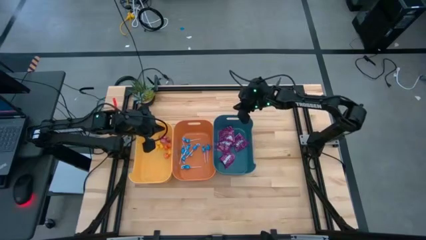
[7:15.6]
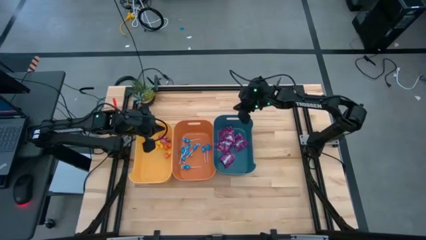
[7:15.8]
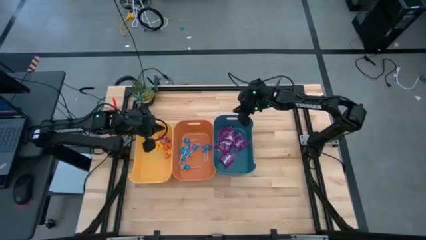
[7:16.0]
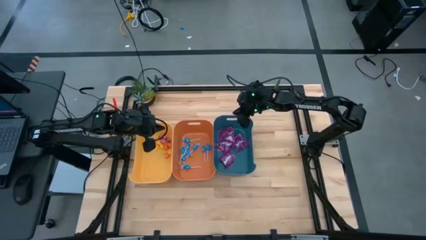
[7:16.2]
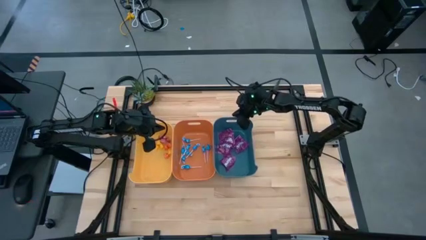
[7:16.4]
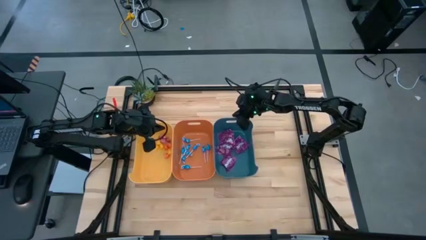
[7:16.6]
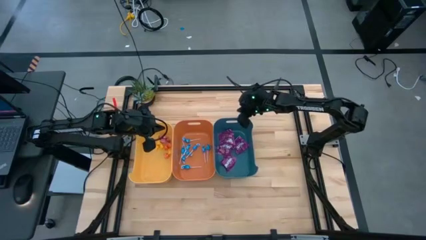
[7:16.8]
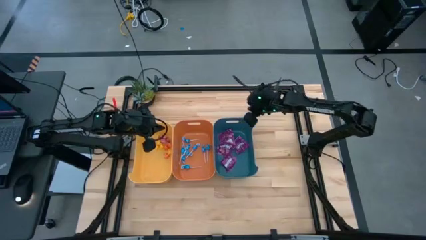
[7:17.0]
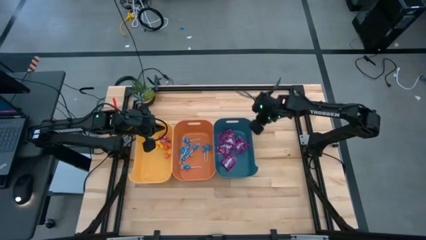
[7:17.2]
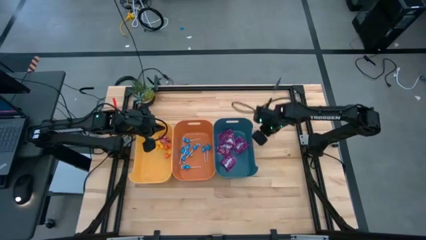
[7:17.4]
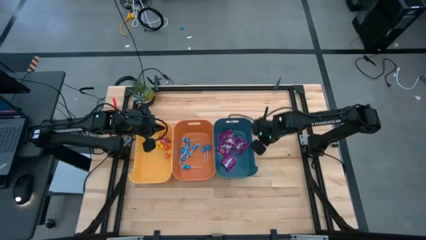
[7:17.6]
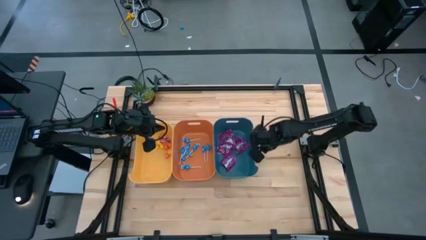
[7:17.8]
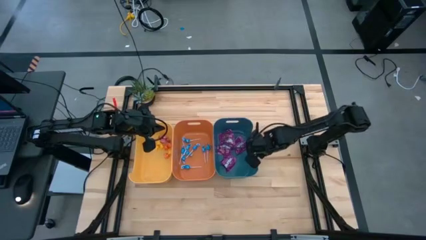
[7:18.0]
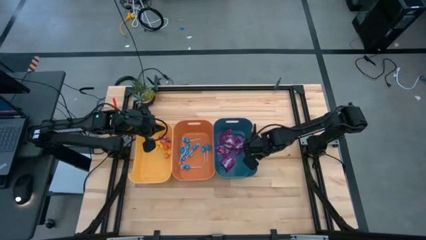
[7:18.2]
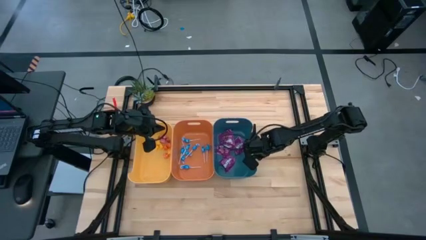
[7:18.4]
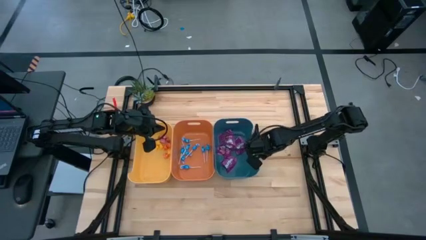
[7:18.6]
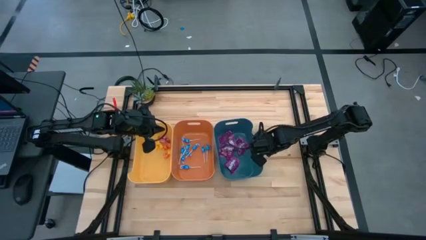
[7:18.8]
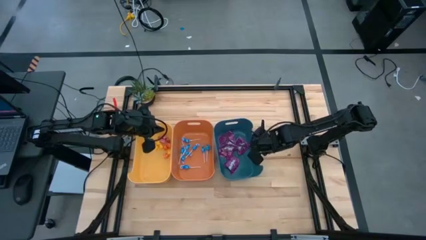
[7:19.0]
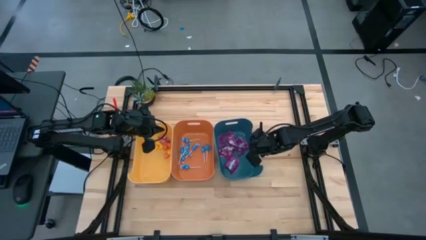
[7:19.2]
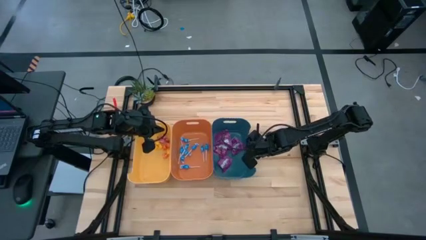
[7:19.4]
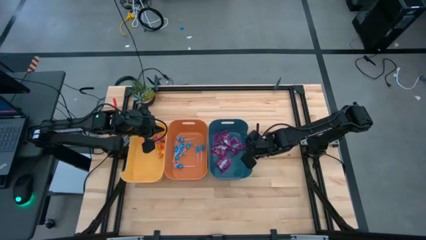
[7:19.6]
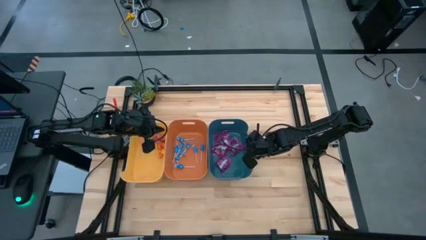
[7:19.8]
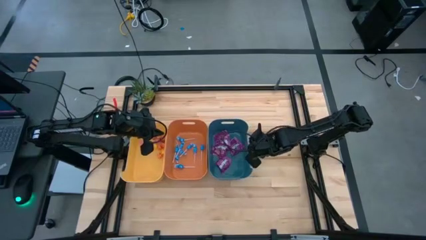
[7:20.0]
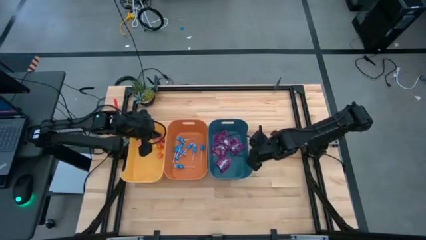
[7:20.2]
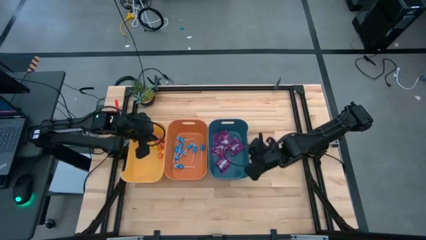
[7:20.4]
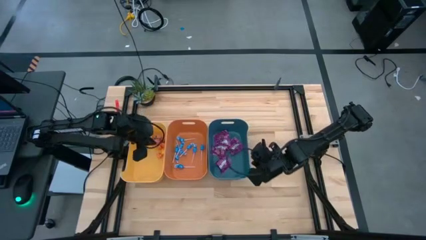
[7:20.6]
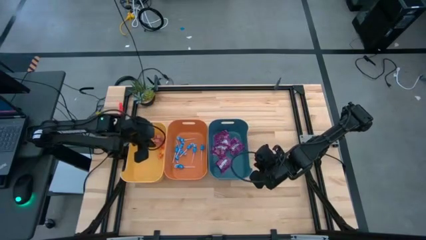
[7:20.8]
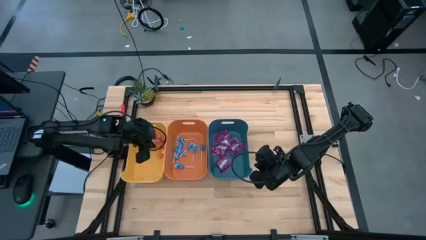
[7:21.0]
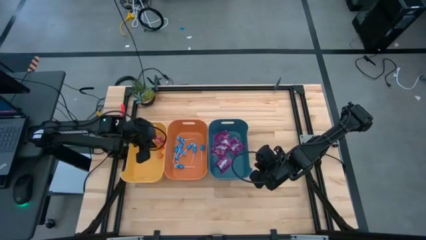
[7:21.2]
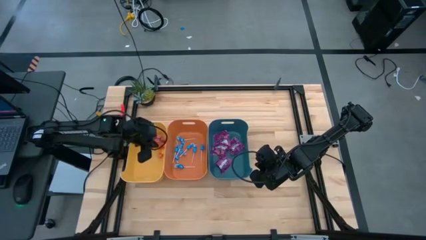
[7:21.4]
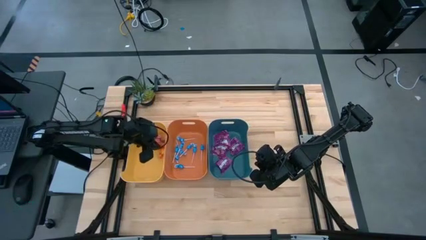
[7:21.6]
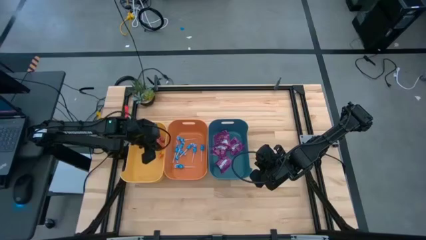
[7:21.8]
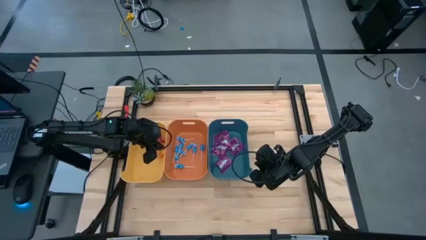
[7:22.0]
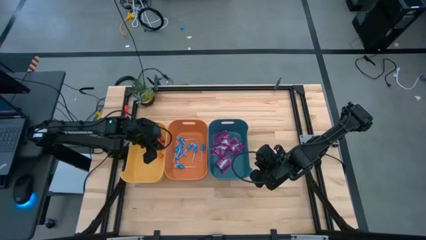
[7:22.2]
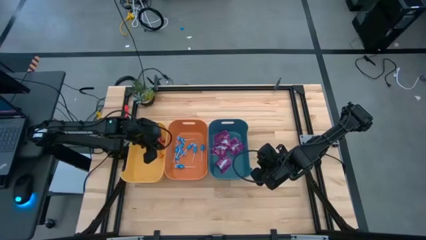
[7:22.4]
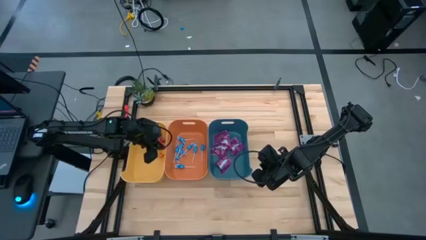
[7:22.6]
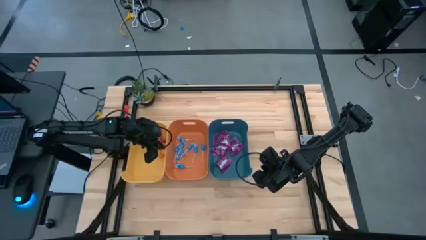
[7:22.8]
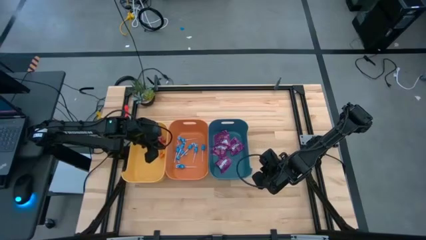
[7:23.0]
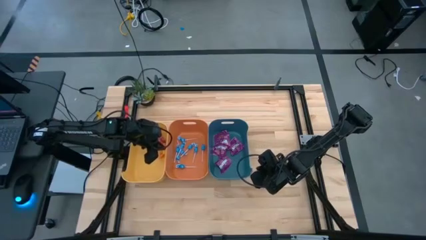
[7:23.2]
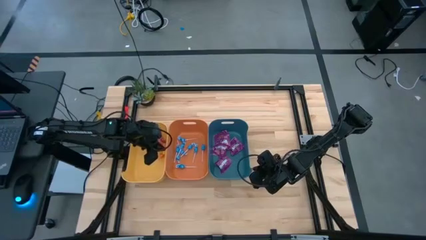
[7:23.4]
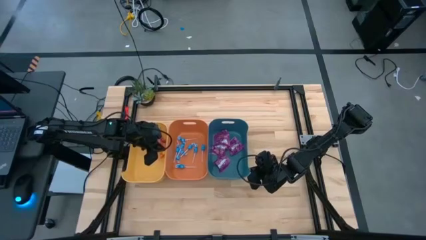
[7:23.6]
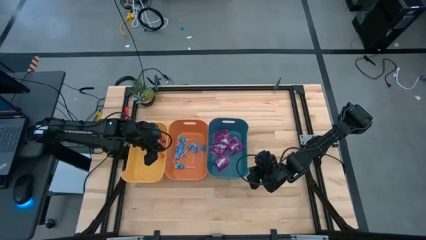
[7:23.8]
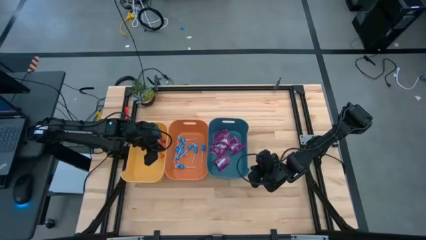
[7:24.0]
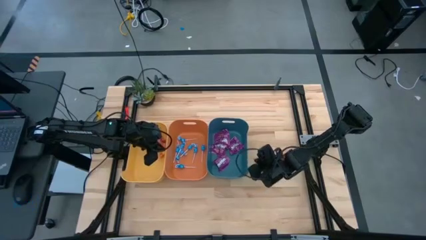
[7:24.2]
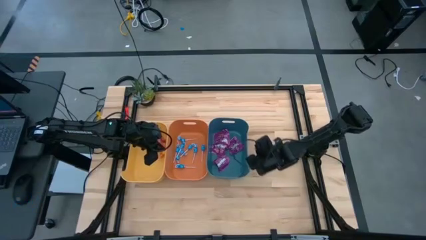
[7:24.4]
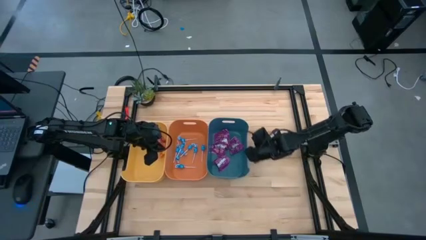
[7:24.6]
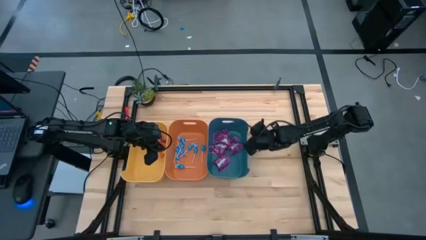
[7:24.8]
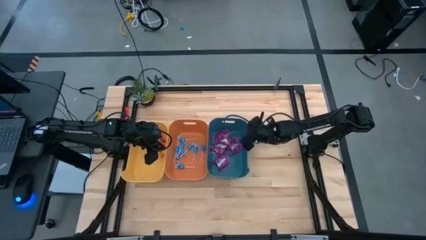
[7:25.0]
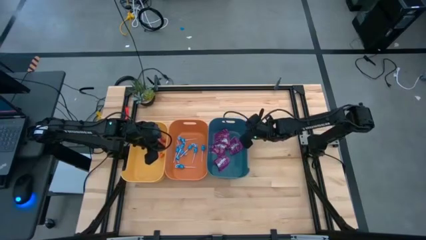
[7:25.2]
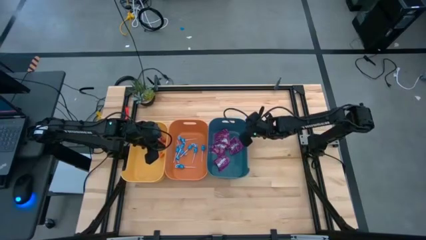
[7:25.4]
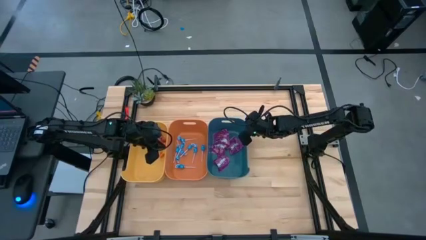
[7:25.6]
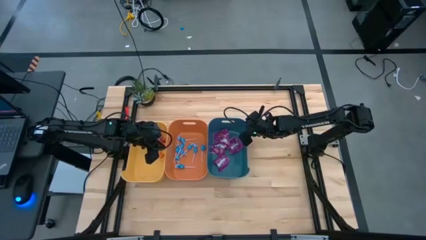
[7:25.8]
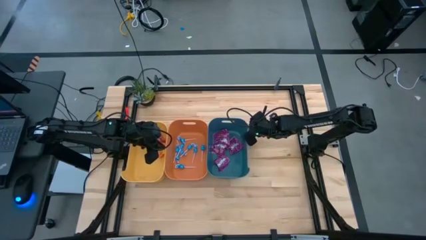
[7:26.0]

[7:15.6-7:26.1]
Task: Sort candy
Move the blue bin beside the orange bin
